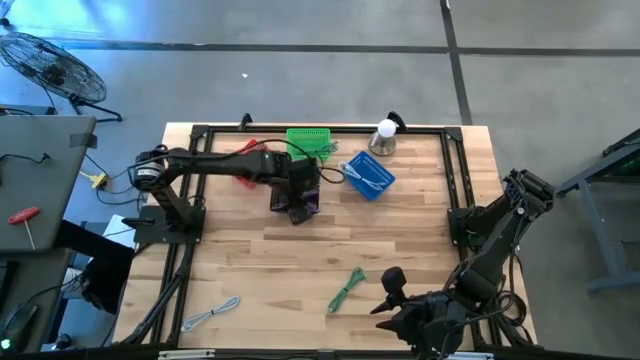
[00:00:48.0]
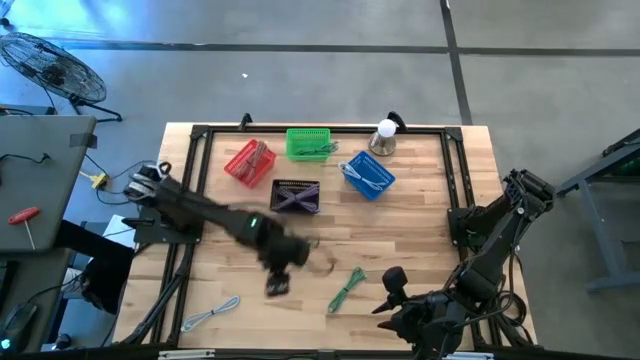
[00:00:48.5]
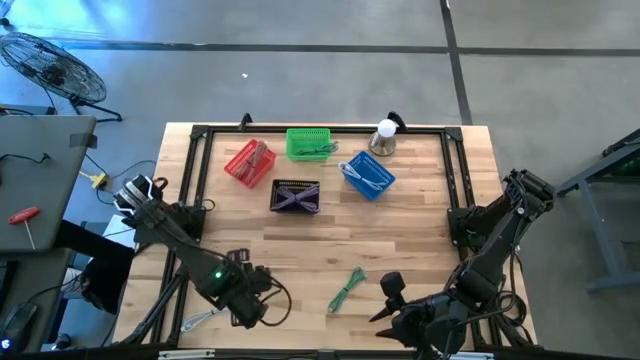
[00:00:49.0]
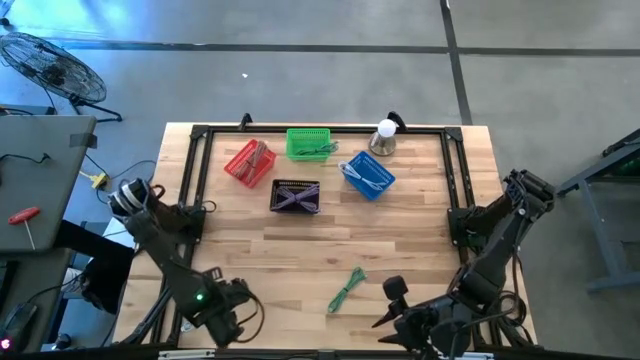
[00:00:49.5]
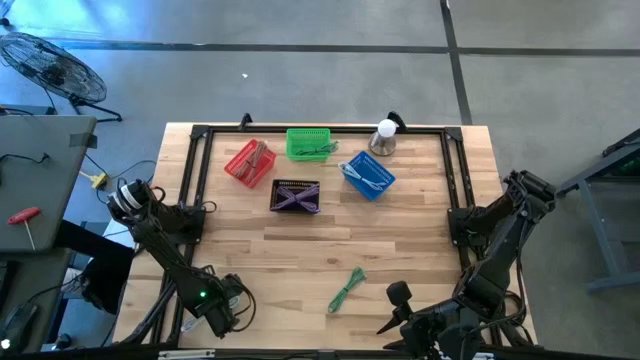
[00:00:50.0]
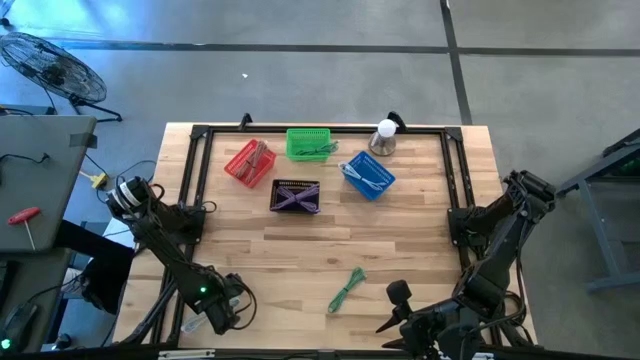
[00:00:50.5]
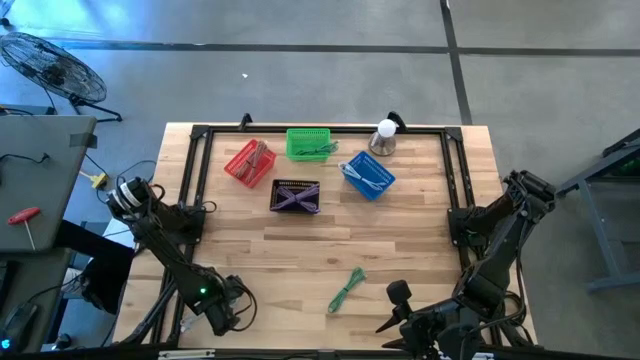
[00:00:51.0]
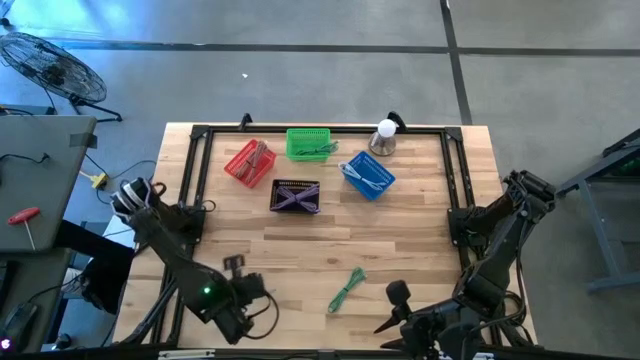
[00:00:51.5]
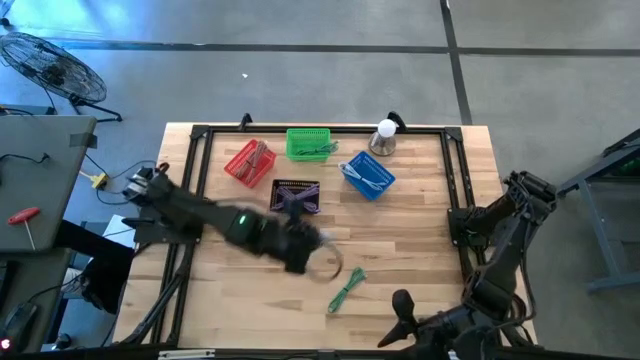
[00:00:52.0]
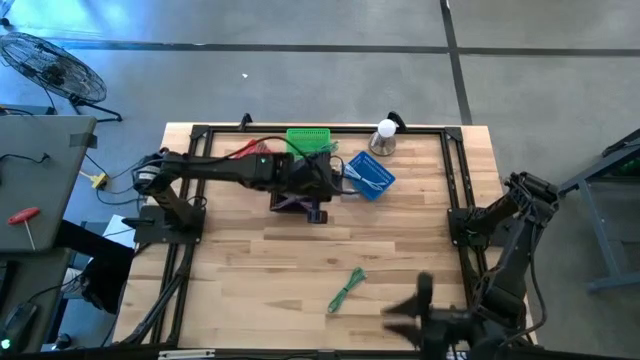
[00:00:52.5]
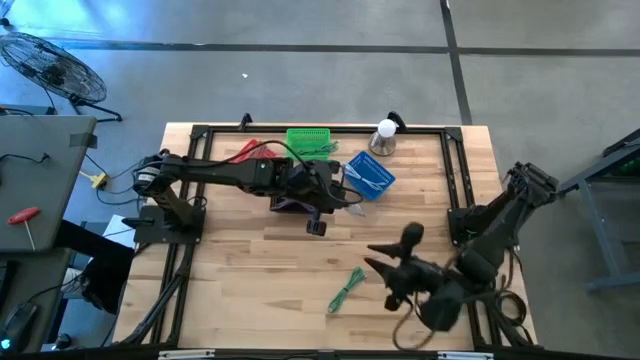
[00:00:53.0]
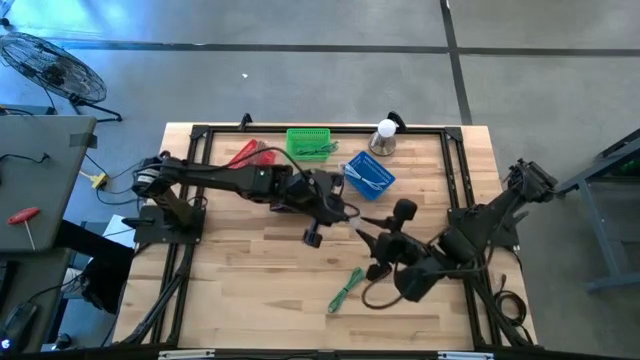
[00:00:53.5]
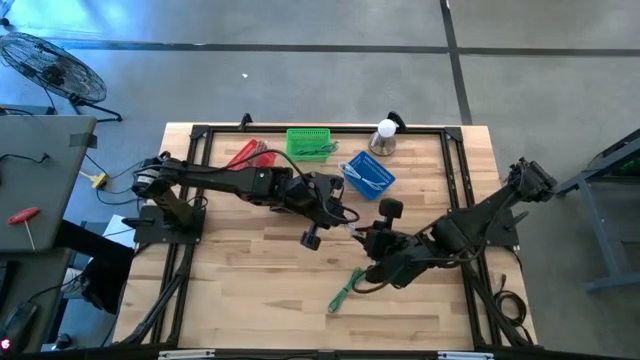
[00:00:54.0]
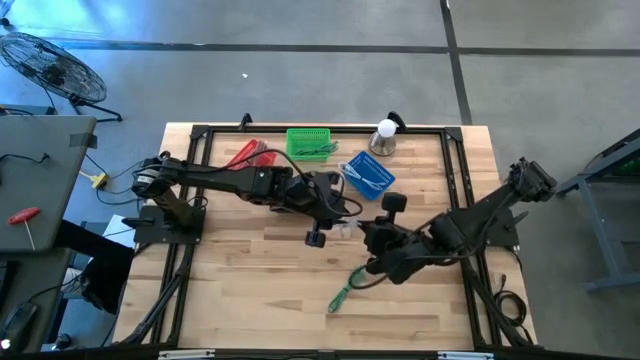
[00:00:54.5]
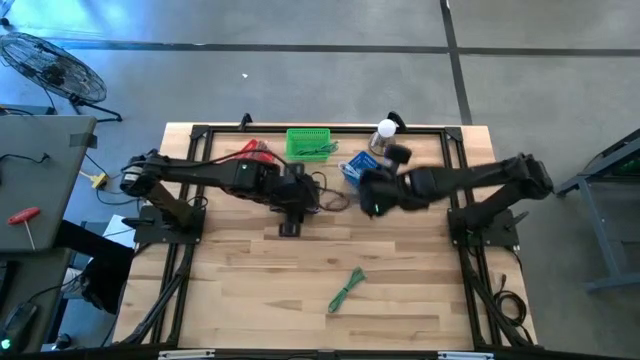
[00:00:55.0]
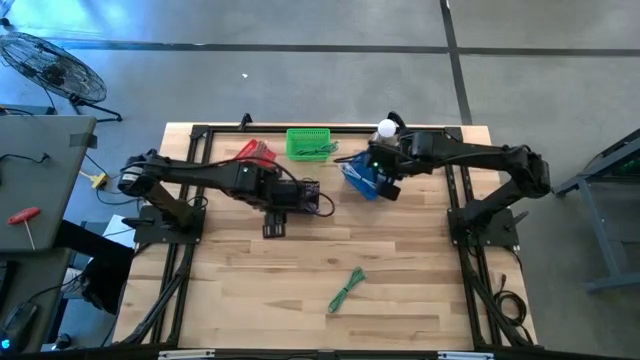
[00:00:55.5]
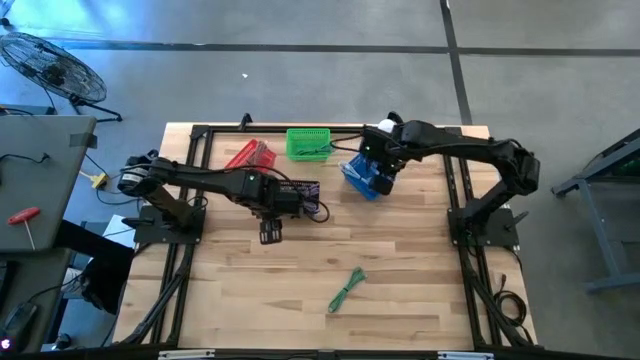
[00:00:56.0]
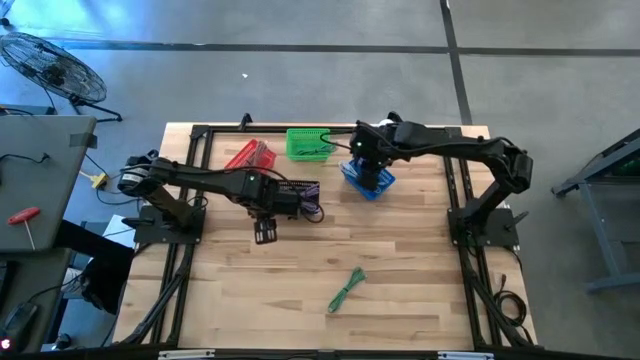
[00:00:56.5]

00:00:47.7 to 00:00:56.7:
Task: Pick & Place USB Port
Put the blue usb cable into the blue bin

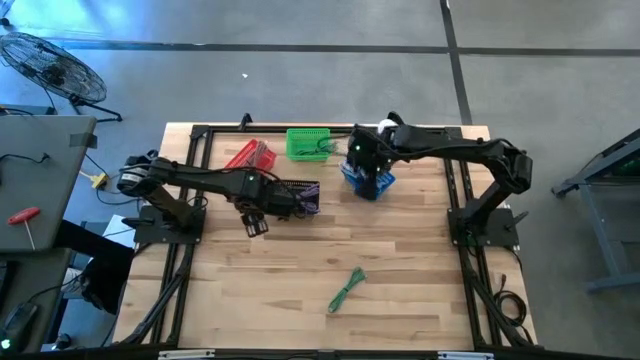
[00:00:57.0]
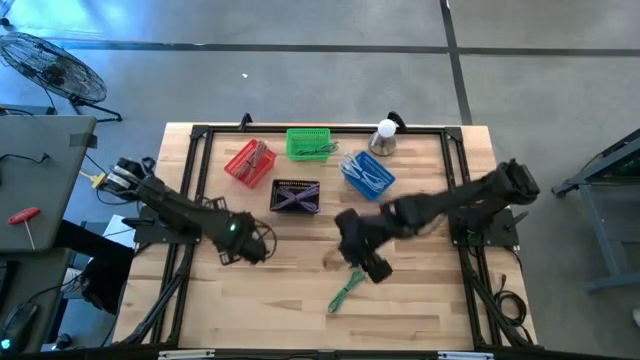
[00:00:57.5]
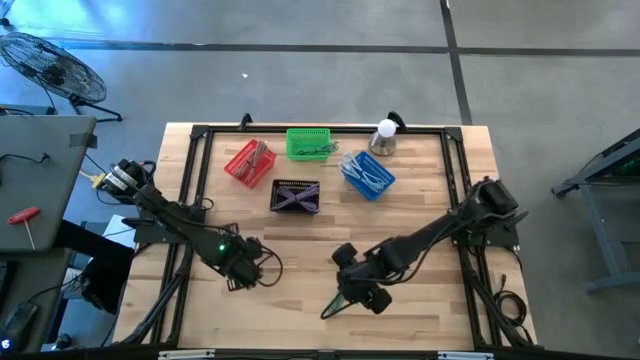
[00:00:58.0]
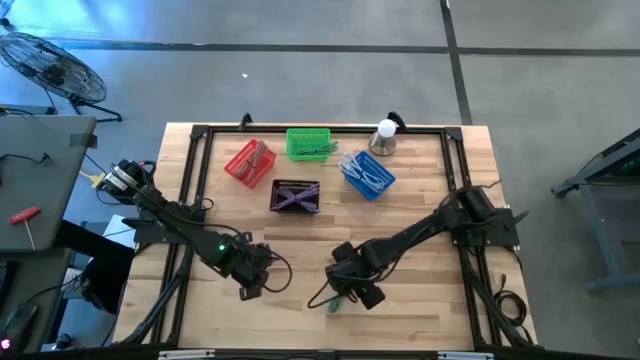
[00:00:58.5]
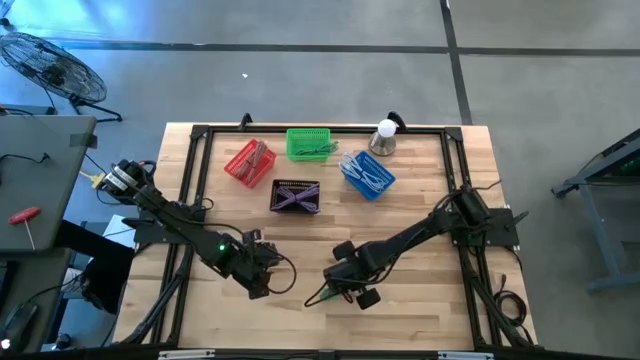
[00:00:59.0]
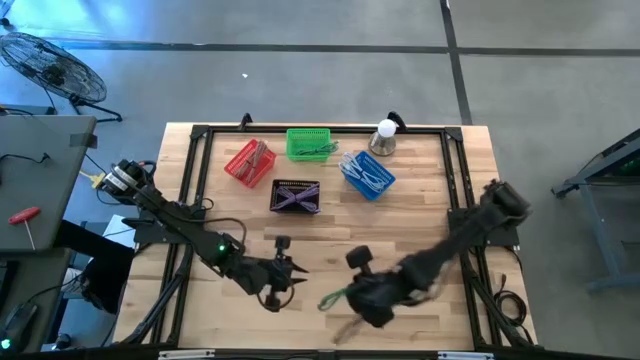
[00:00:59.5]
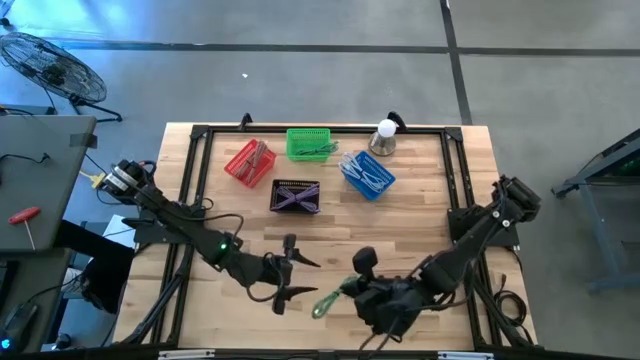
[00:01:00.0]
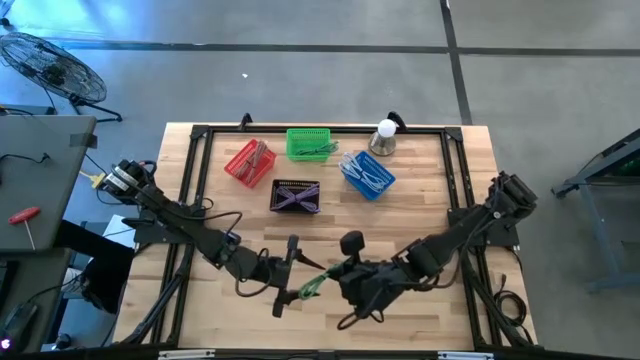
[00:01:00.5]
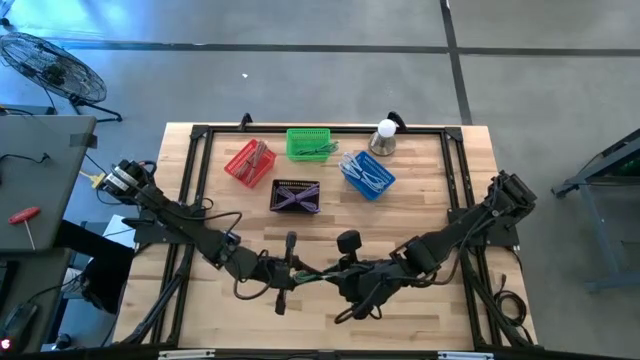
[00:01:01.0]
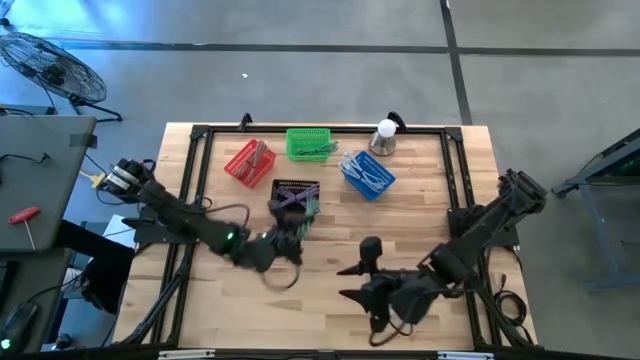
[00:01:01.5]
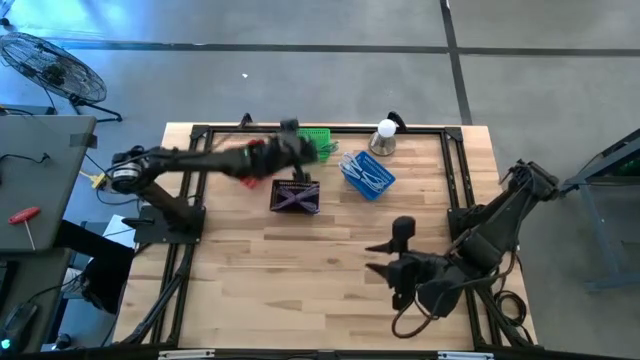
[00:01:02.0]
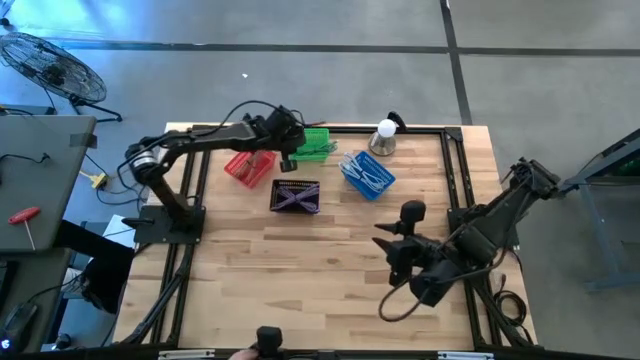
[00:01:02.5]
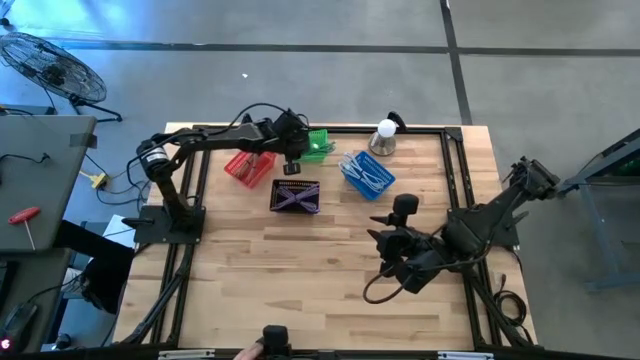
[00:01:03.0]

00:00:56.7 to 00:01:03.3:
Put the green usb cable into the green bin

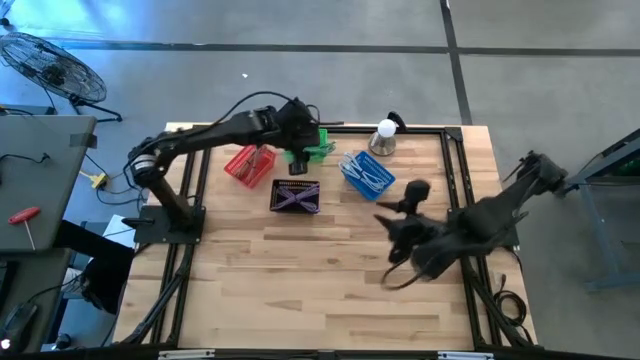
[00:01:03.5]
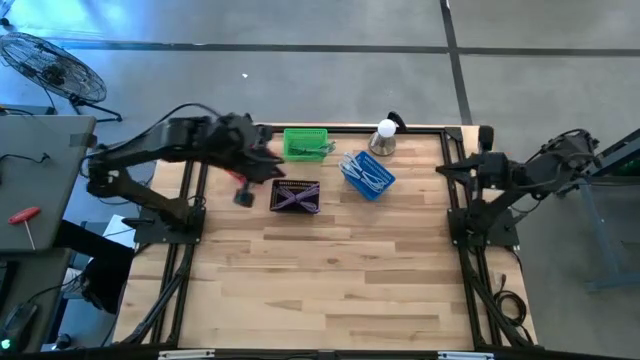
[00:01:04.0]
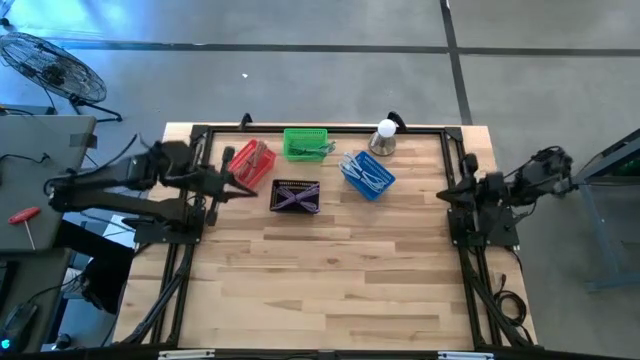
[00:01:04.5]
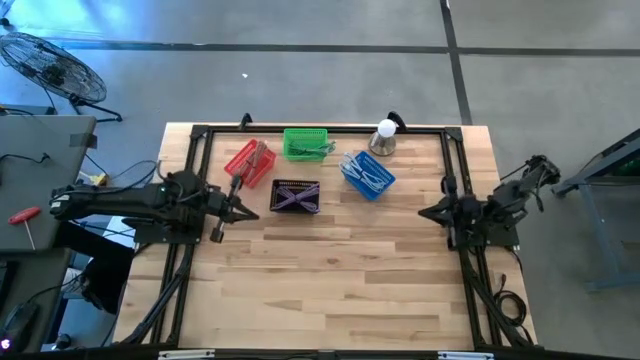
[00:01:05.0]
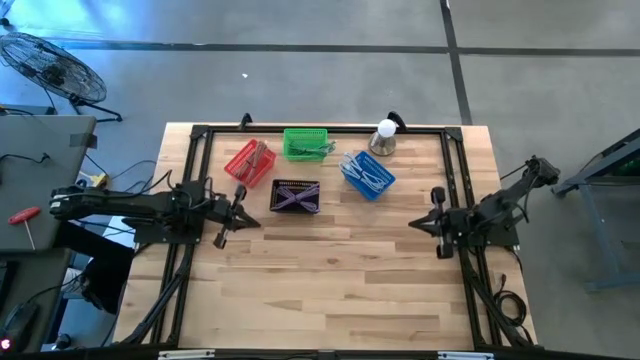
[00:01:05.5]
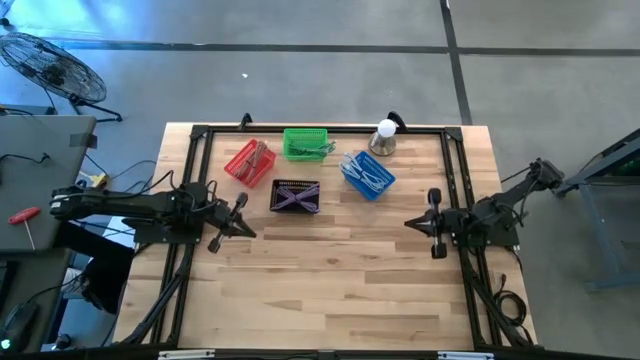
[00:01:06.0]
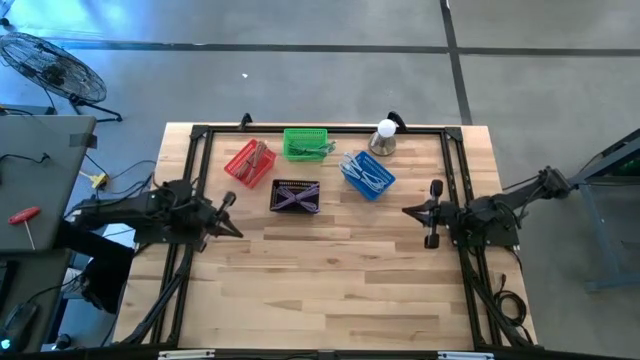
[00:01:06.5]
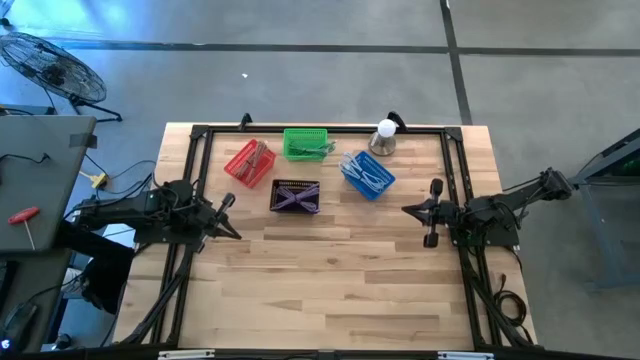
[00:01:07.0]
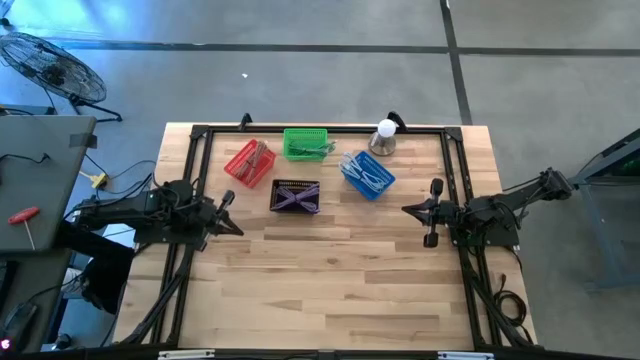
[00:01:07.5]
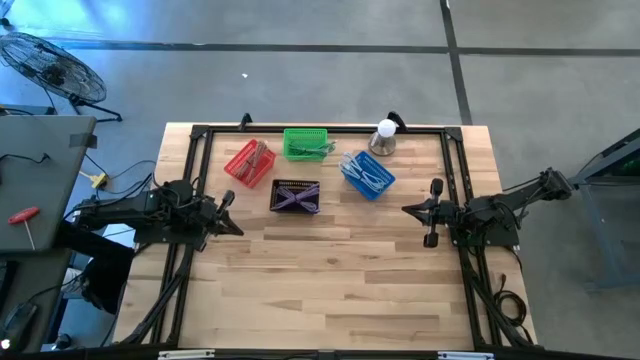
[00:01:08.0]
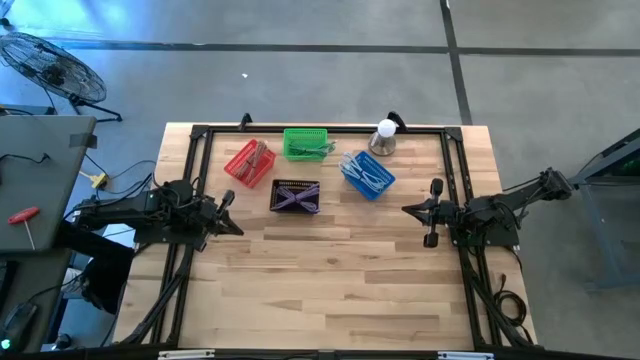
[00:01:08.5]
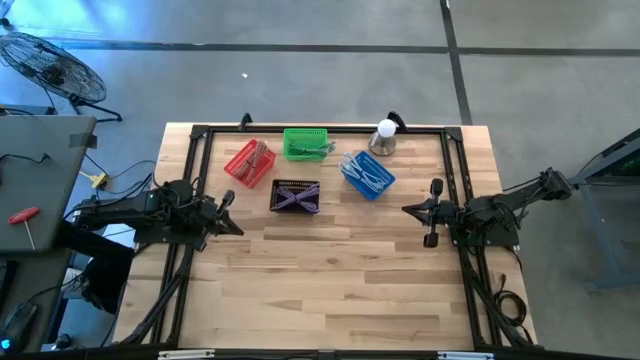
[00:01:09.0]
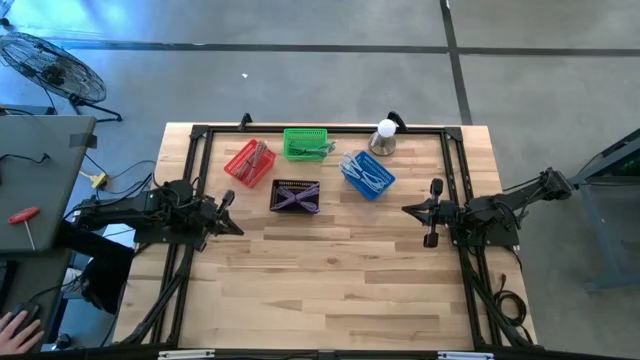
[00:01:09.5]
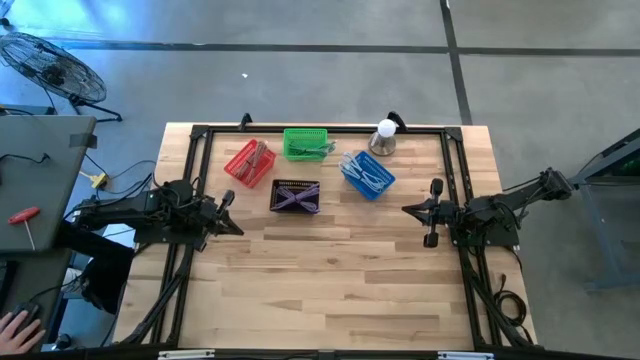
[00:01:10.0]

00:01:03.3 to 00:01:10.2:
Return to Home Position
